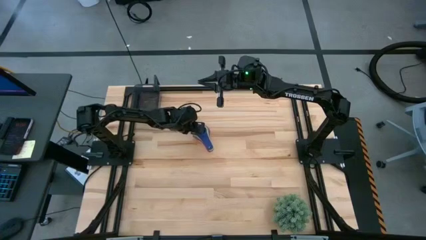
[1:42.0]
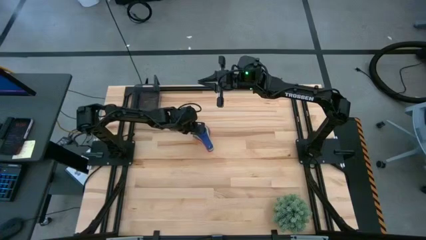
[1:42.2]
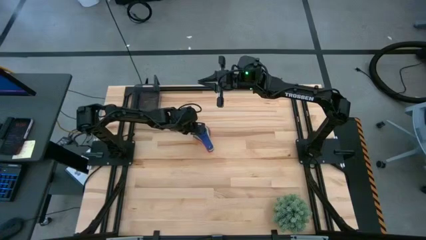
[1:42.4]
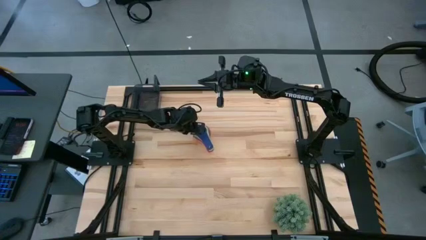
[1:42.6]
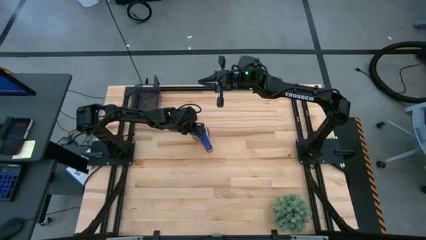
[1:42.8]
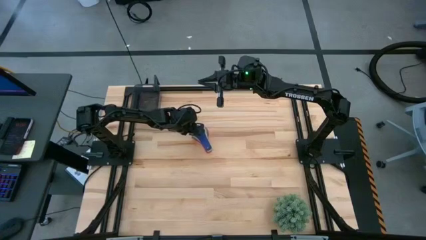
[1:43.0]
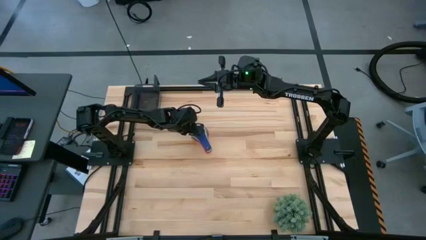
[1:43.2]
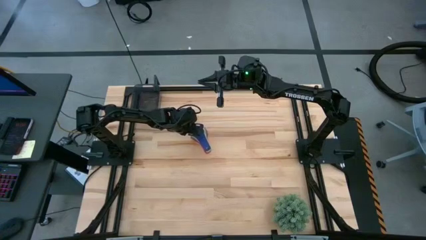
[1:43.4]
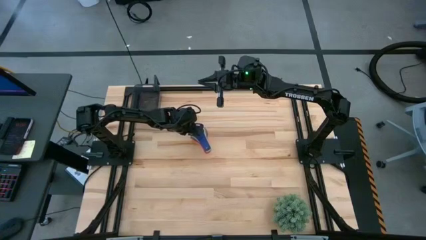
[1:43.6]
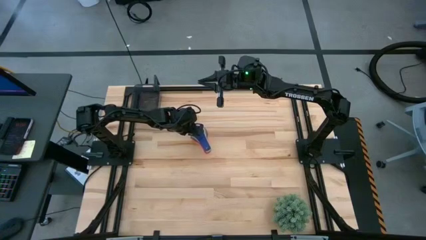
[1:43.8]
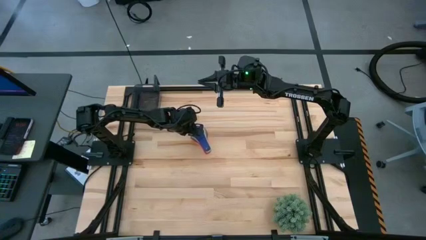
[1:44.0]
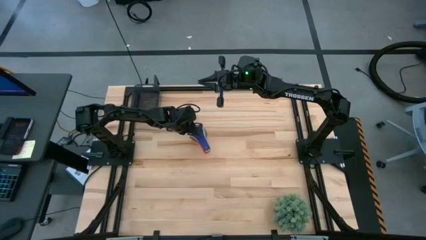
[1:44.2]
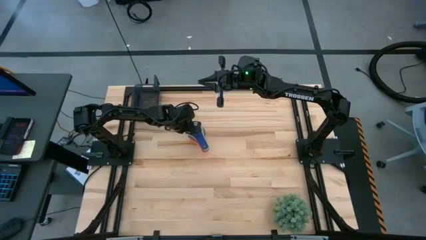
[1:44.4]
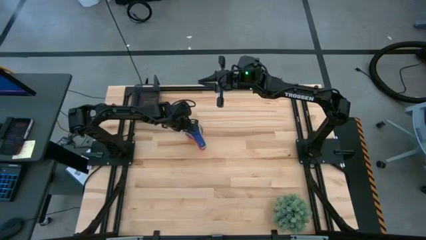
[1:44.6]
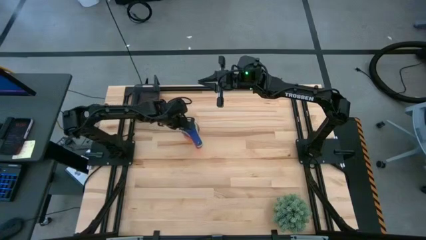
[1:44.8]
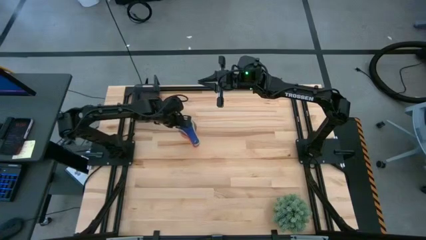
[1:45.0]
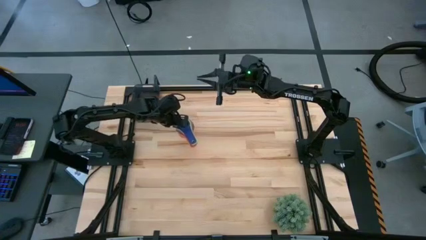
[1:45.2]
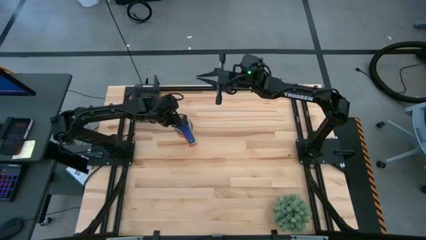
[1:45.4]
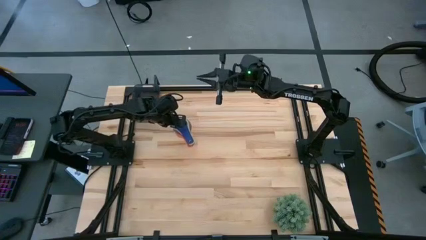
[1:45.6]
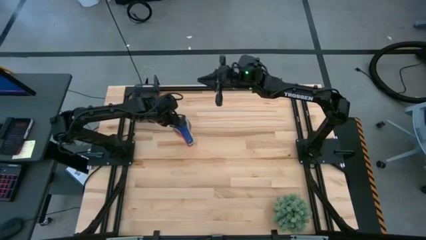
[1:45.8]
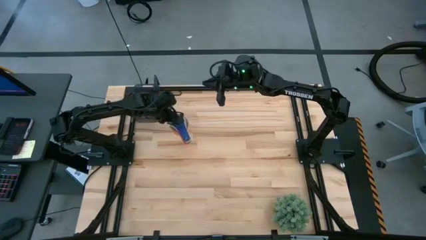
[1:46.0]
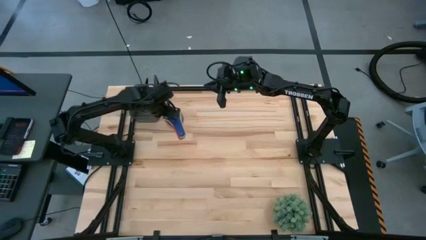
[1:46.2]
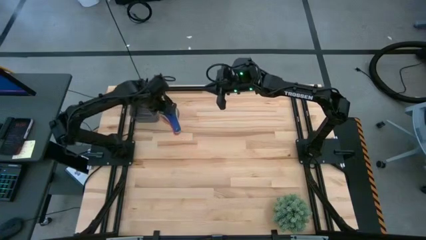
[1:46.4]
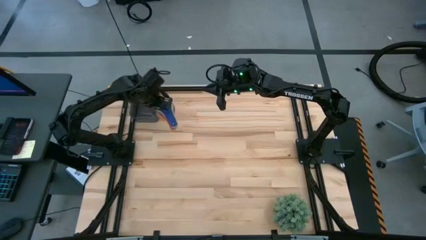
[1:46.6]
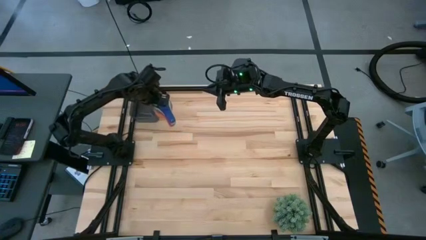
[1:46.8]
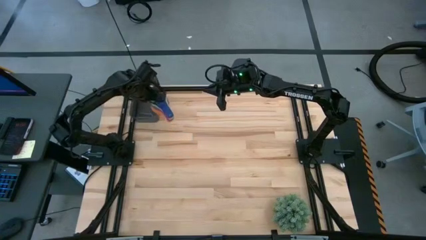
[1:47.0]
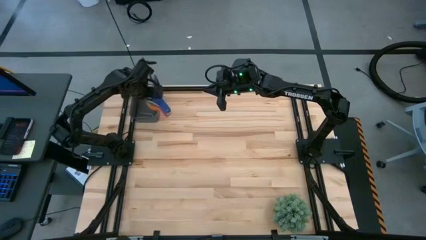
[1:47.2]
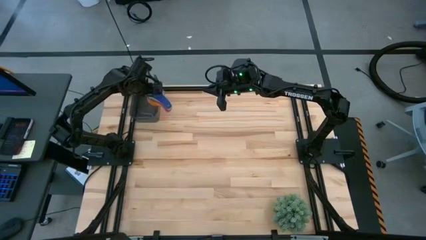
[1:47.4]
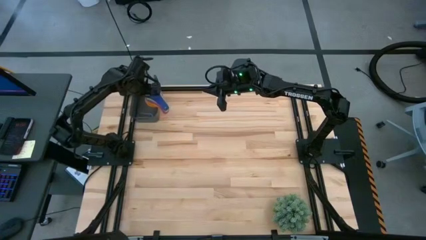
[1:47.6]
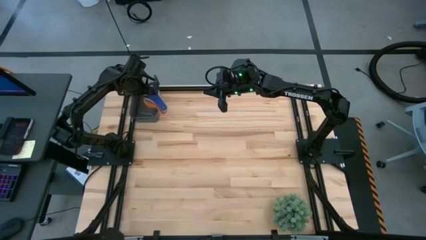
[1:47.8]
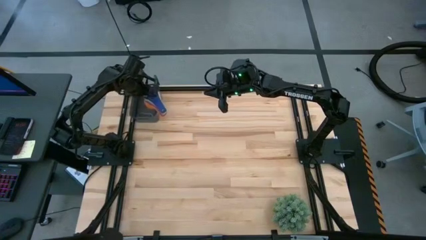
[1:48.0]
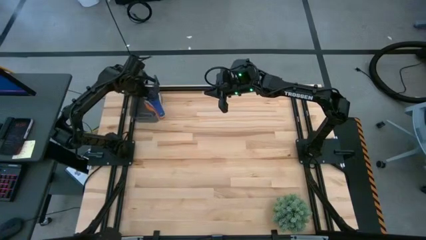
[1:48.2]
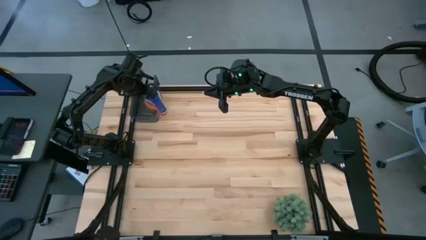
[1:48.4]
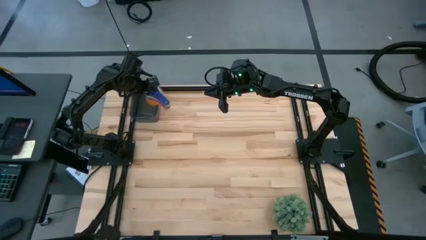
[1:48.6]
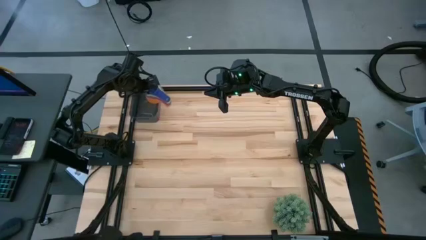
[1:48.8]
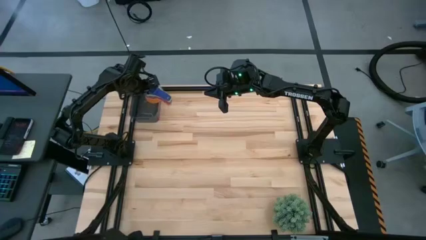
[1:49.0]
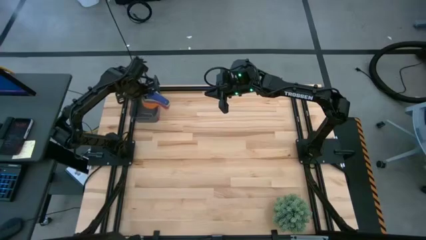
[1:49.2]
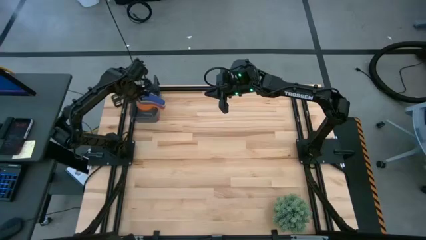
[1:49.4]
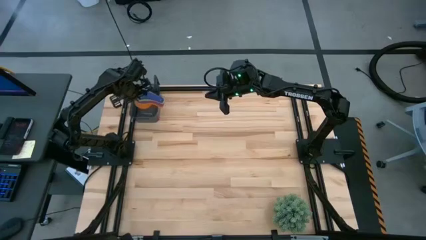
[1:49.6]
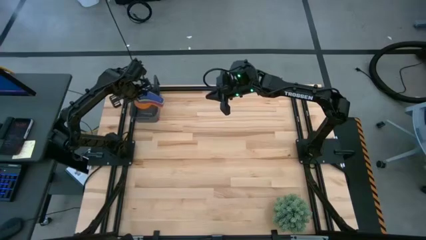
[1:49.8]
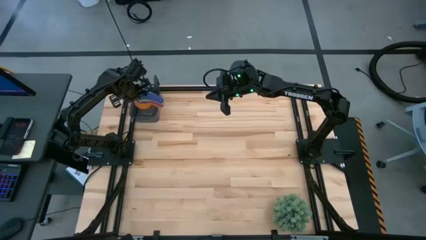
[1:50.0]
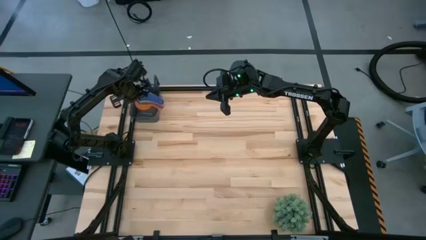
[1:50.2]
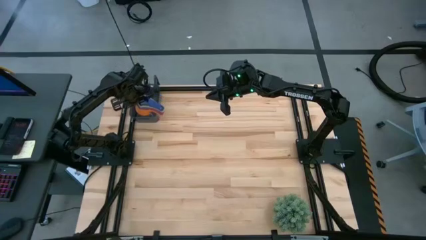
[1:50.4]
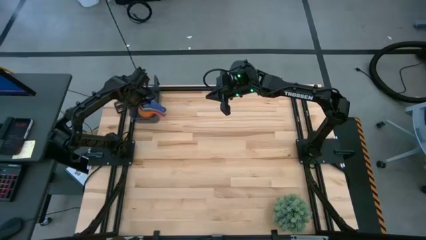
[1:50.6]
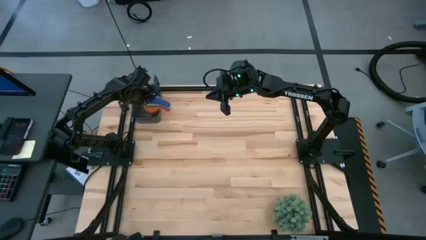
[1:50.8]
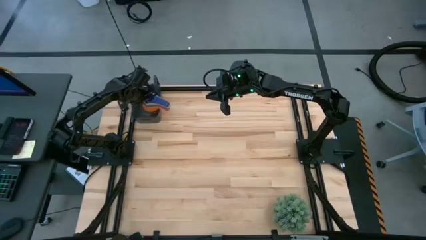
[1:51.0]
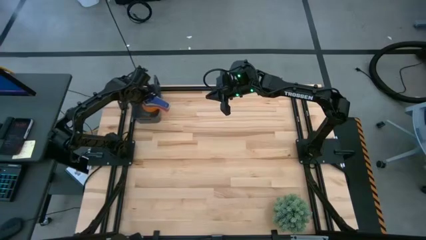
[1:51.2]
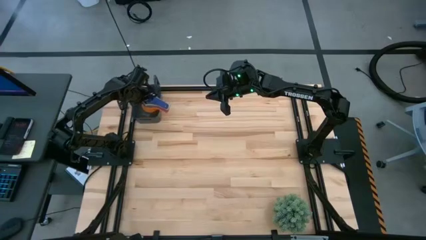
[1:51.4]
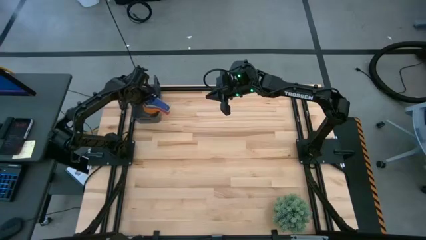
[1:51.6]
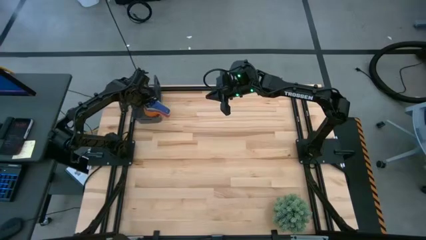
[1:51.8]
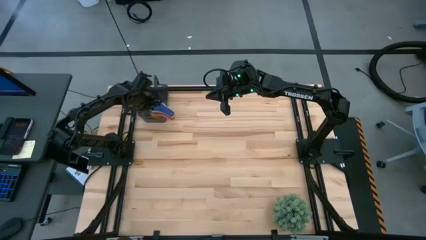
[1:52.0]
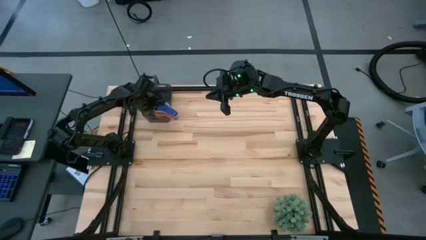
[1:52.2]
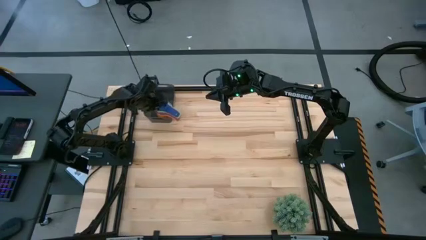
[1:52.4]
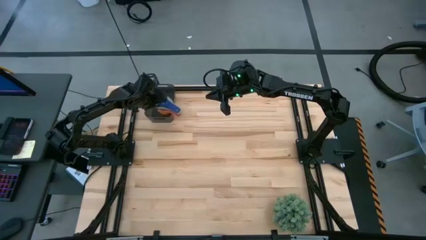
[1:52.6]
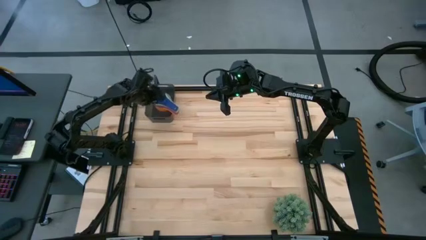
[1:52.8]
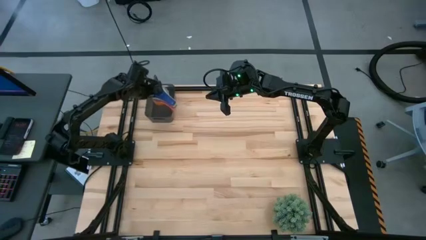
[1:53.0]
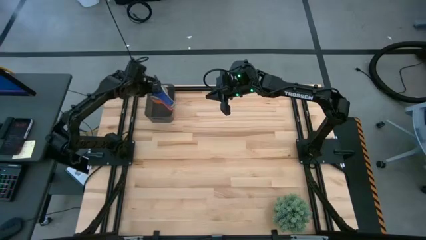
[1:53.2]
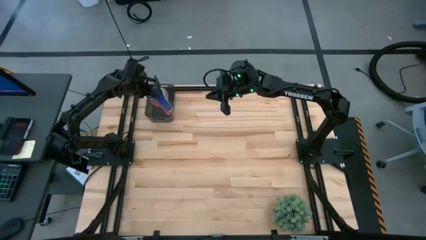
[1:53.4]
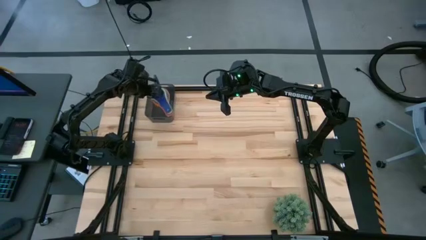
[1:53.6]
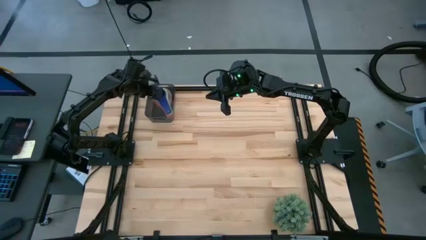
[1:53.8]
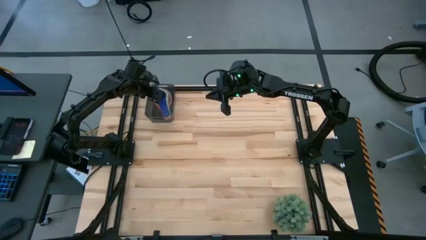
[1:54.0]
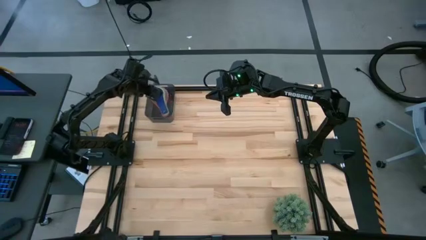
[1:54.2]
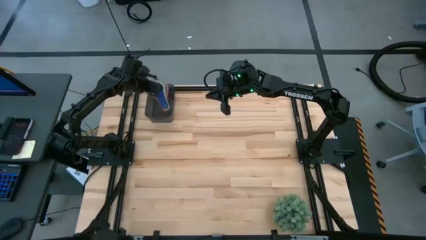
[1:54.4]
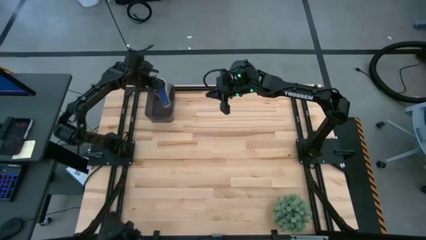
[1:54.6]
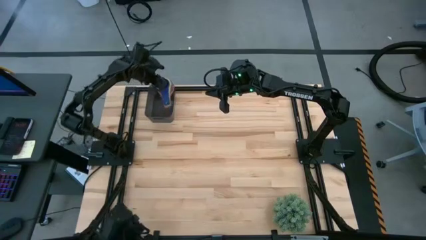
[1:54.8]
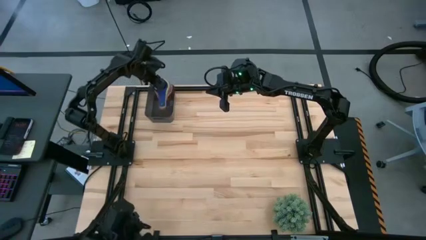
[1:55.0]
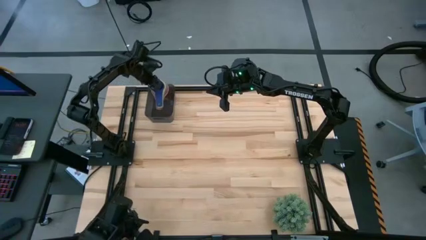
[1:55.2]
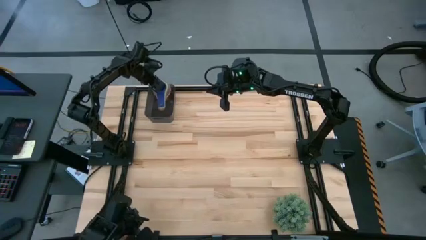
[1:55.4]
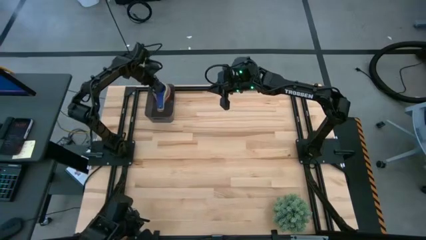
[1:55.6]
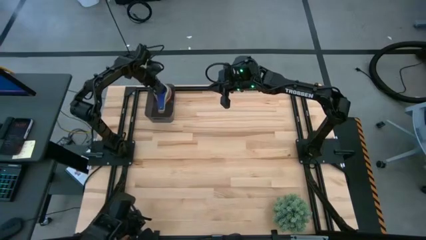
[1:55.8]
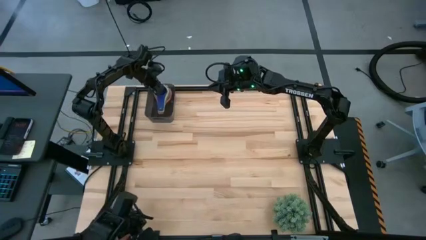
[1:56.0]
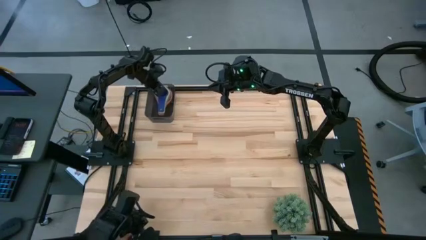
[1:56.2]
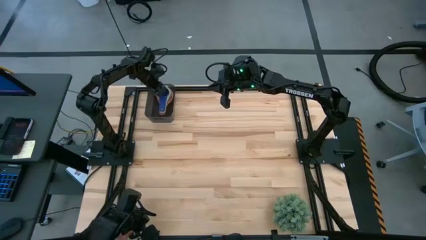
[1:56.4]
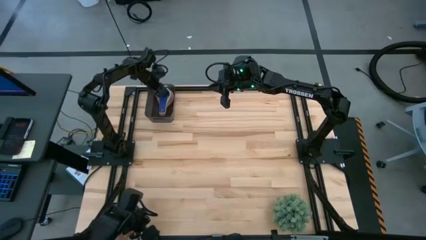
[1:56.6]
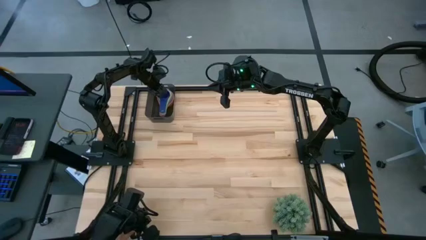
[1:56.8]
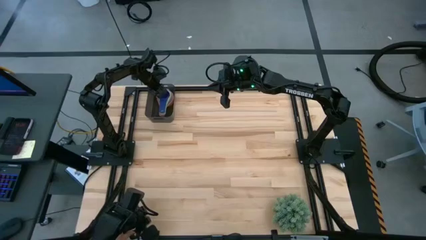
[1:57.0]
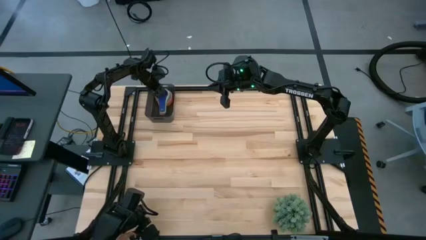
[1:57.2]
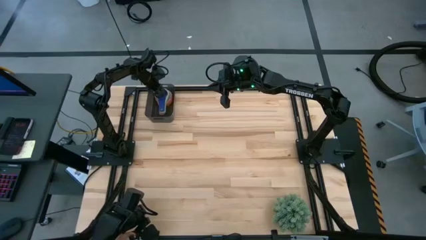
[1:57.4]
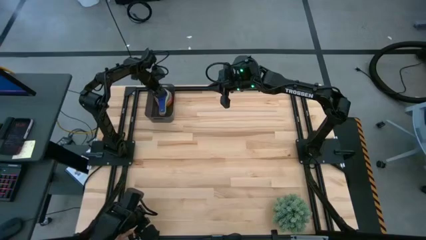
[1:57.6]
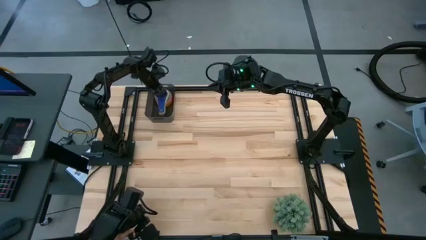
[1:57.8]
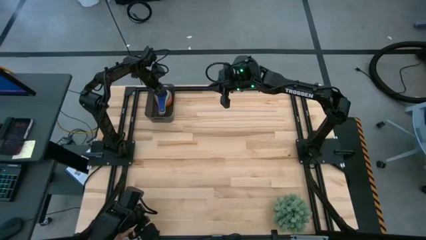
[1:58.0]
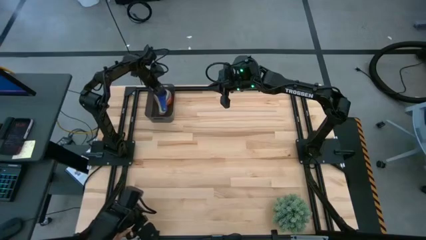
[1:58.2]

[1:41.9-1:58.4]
Task: Nest measuring cups in basket
Put the stack of measuring cups into the black bin
